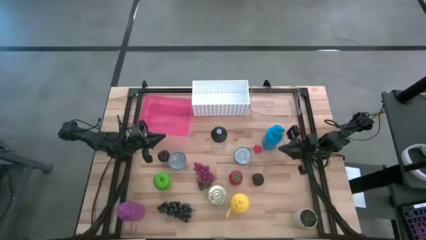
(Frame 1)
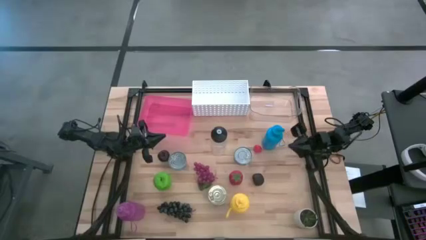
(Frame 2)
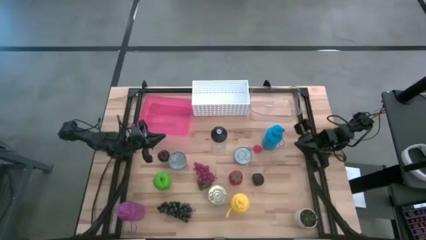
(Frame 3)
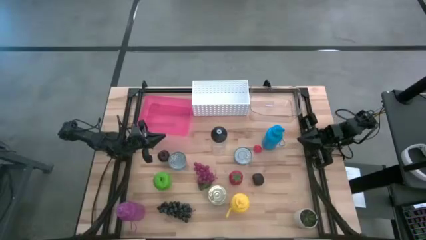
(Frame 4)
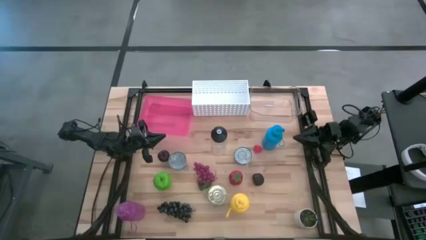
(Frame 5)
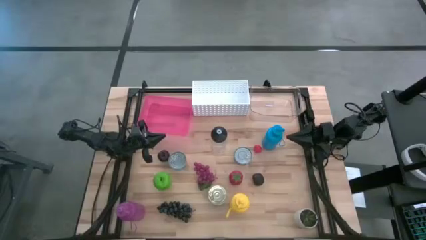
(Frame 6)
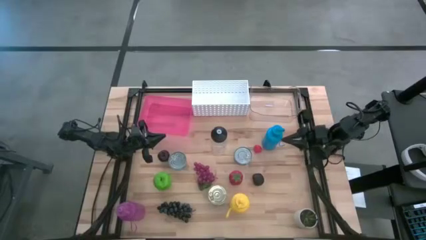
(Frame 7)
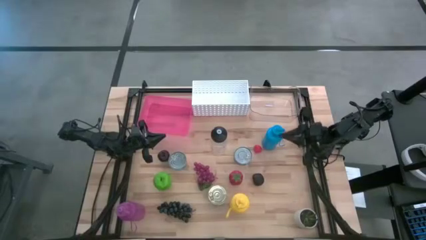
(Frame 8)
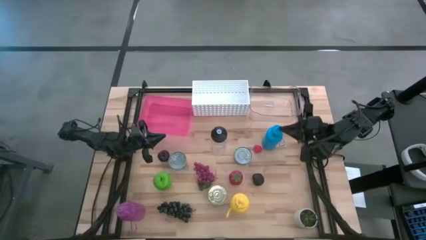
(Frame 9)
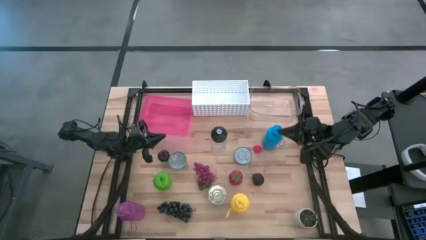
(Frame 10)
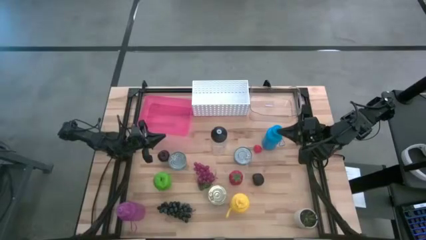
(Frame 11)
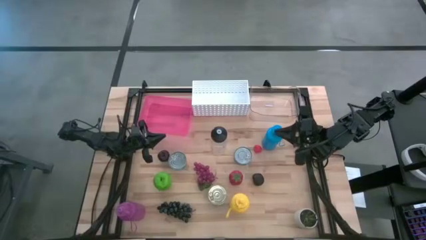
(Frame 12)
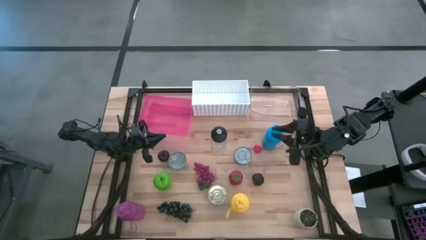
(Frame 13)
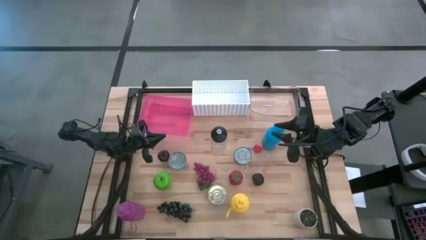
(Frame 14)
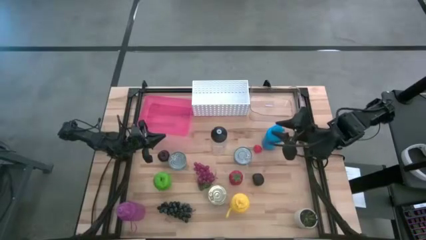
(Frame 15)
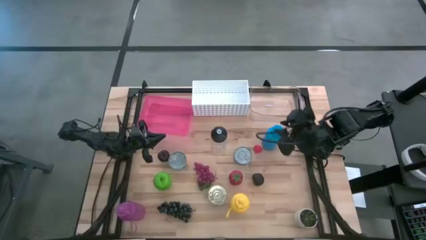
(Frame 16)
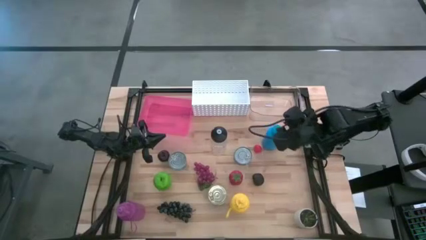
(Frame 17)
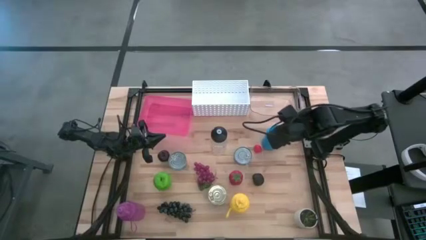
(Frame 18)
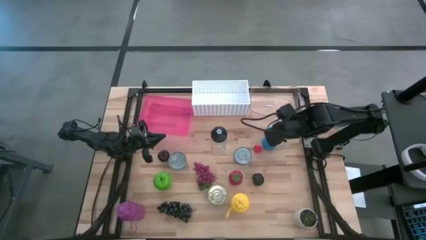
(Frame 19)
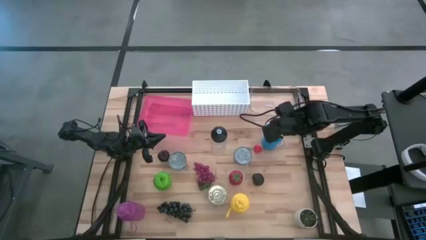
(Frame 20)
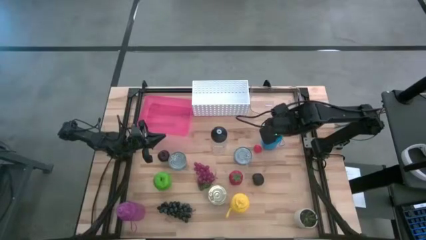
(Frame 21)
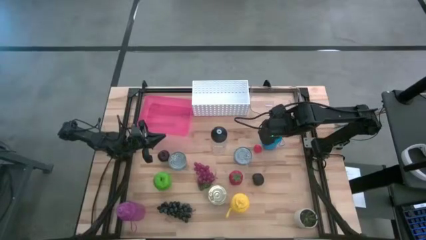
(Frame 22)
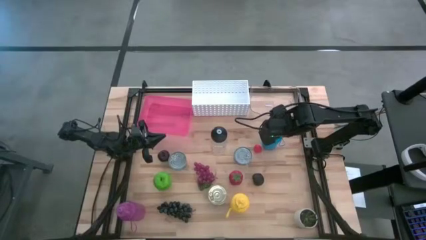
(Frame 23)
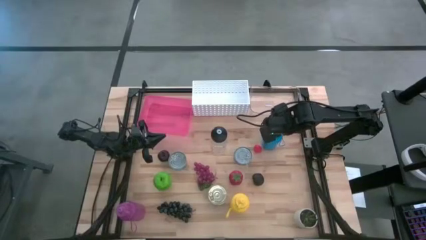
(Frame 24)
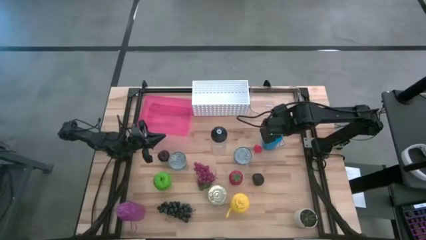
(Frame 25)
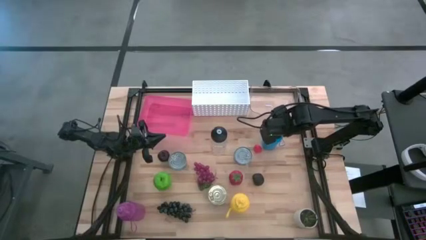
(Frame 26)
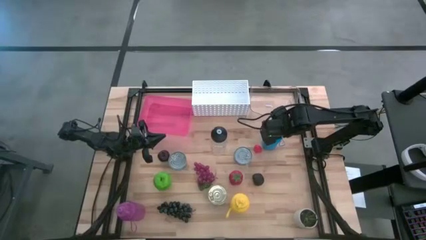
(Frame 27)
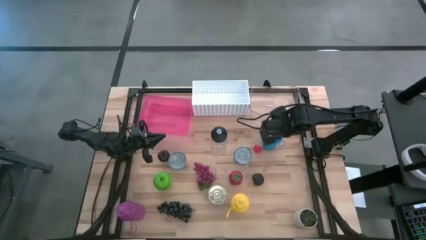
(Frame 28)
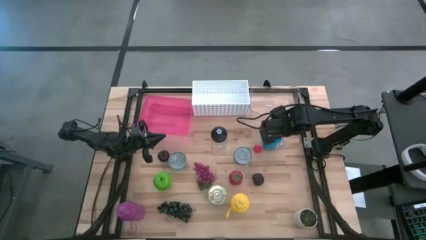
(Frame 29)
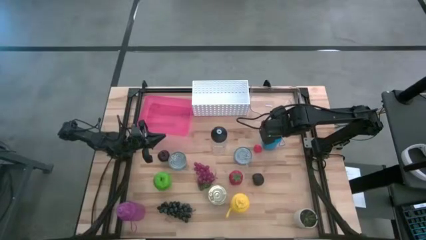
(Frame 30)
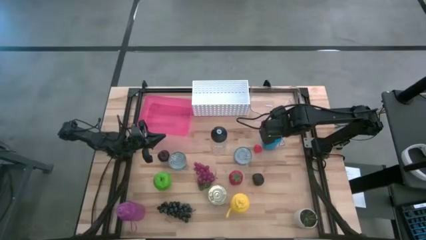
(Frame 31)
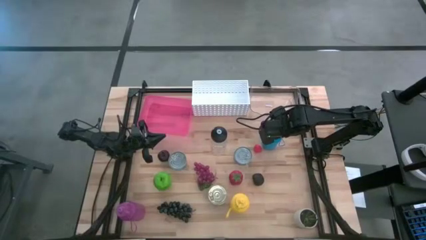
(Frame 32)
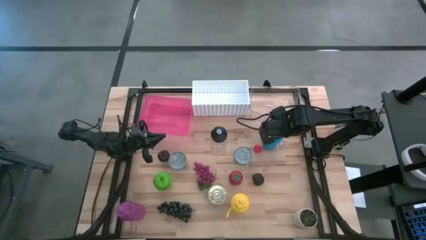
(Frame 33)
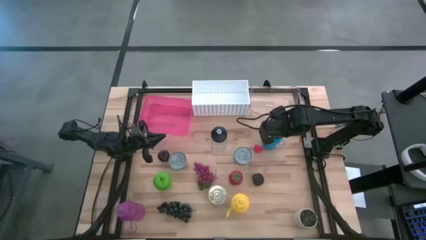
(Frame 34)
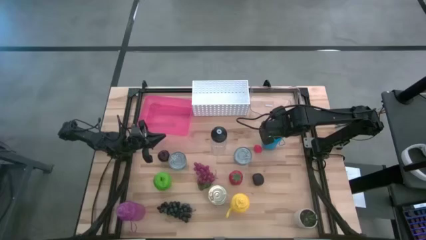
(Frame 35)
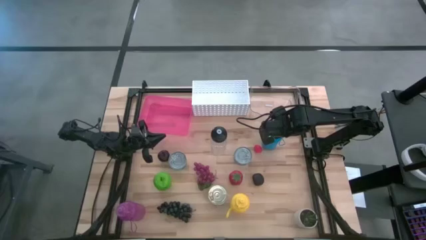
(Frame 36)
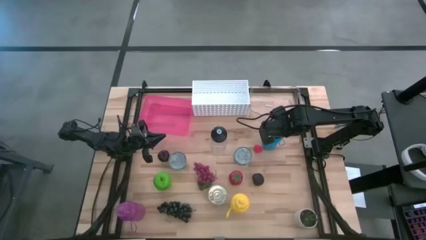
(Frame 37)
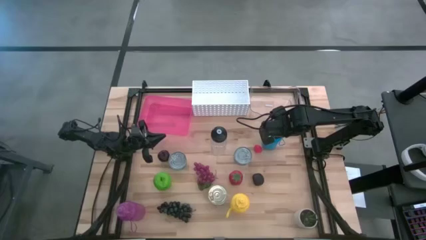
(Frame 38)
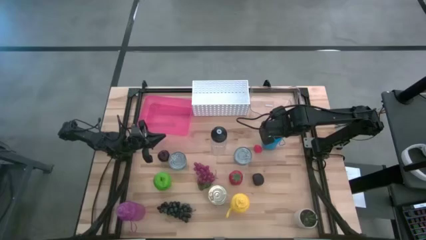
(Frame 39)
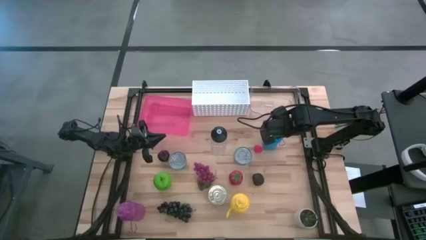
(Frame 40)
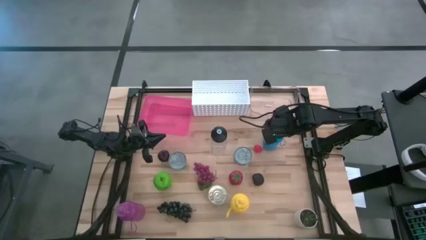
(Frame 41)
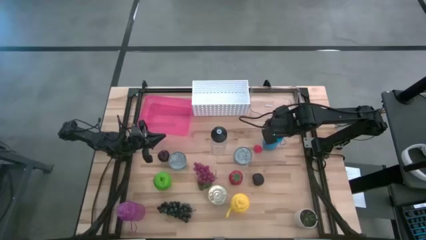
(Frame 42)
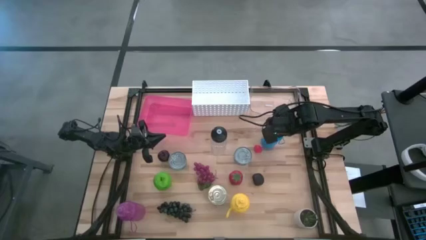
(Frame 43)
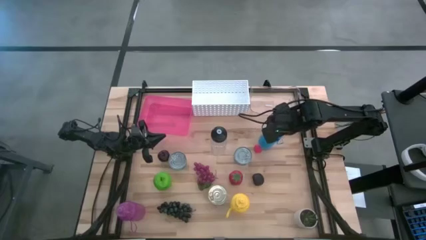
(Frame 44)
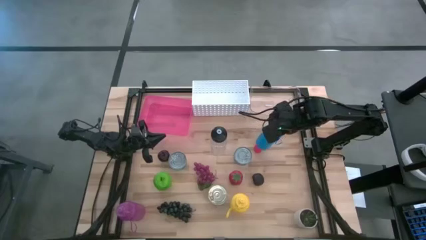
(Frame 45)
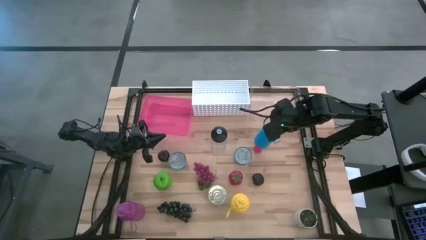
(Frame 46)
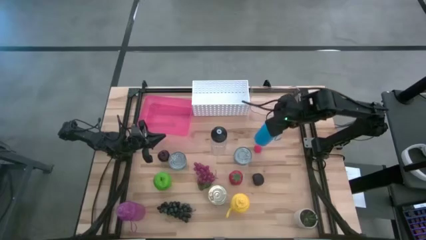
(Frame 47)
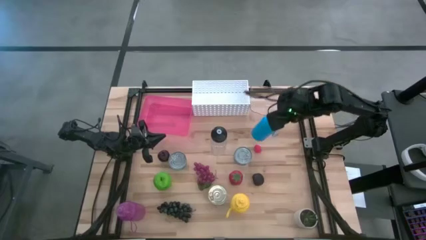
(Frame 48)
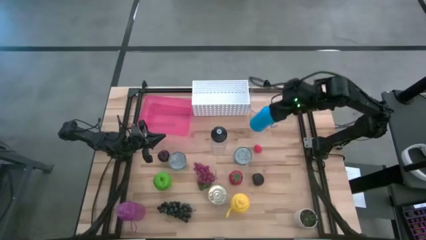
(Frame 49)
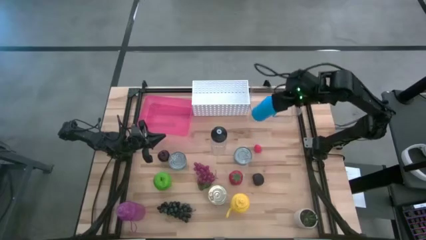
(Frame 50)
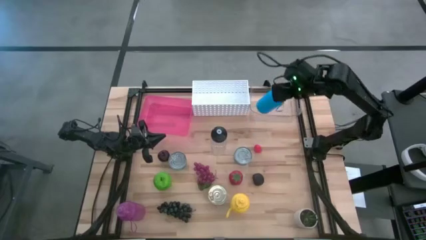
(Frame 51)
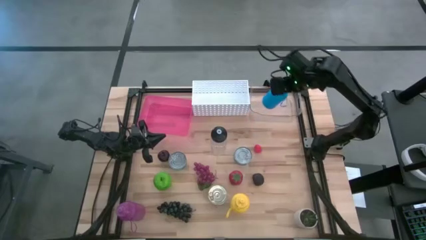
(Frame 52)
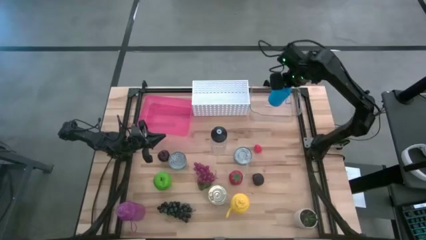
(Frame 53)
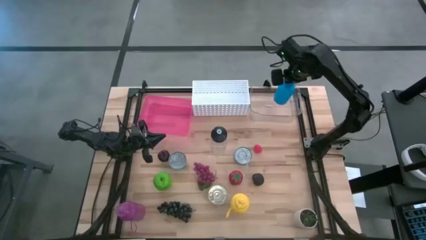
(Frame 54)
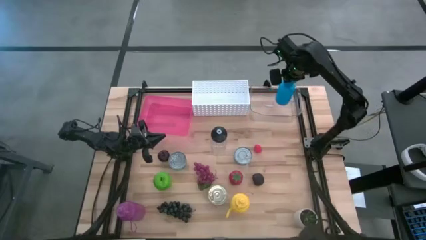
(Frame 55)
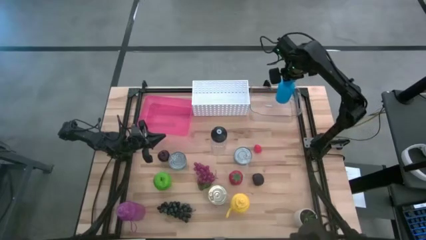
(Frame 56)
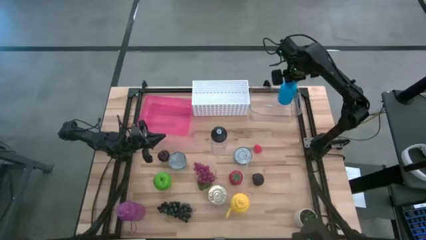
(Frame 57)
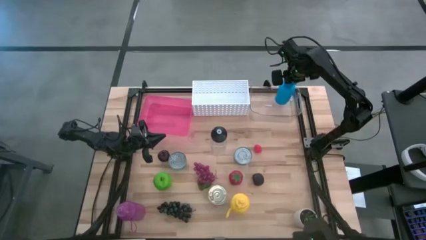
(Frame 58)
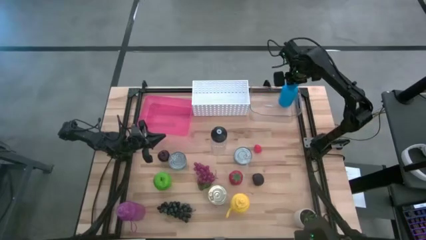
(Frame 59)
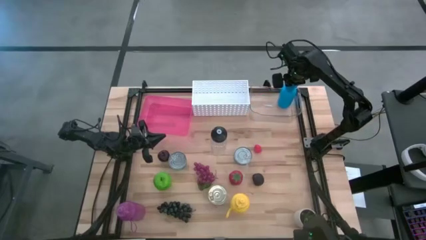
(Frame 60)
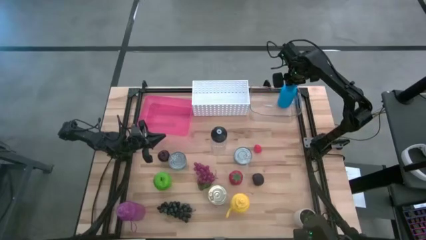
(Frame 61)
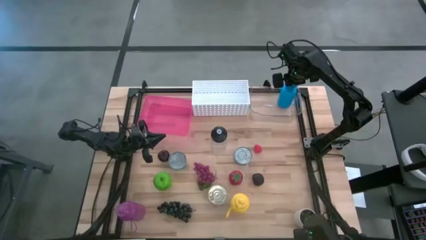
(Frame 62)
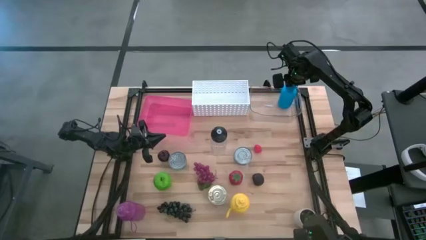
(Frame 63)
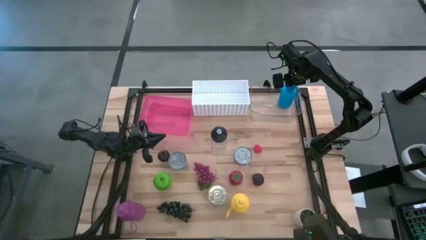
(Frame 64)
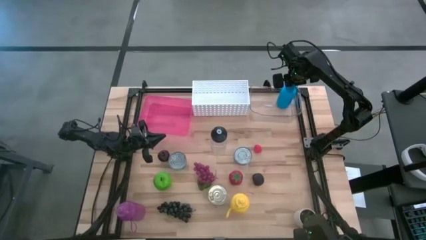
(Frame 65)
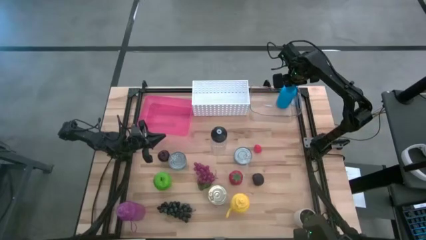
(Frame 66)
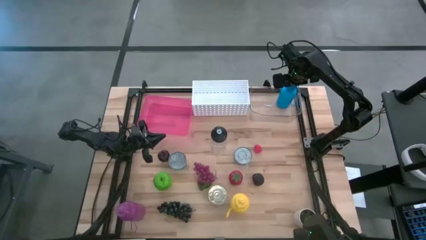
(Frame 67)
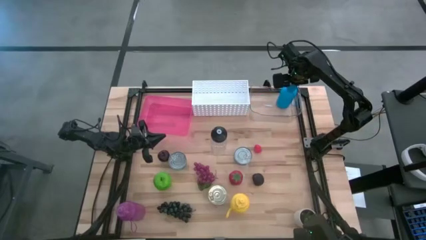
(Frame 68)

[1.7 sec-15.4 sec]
Task: Pick & Place Food Item
Put the blue water bottle into the transparent bin
